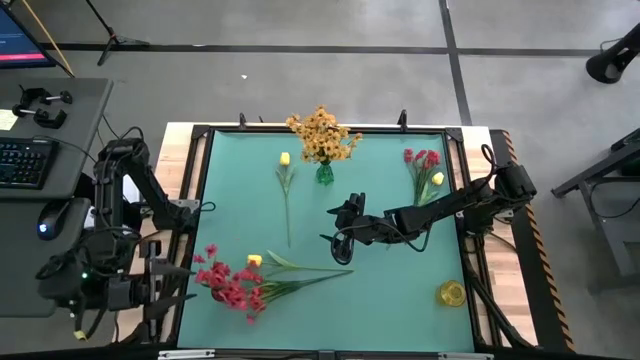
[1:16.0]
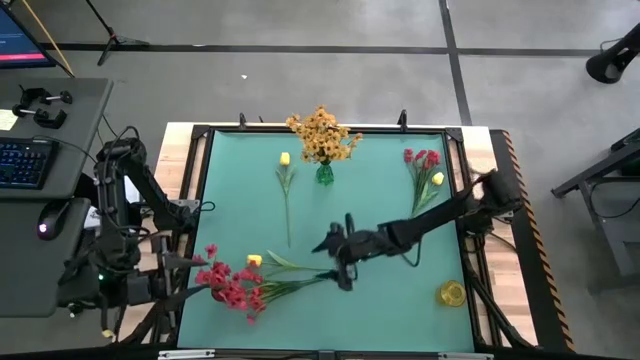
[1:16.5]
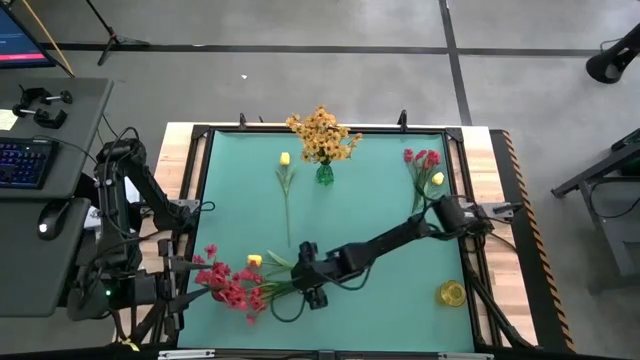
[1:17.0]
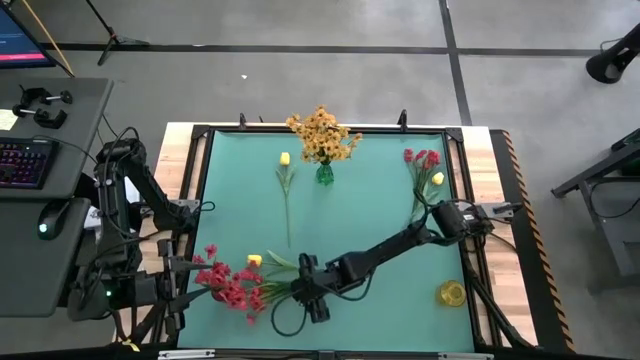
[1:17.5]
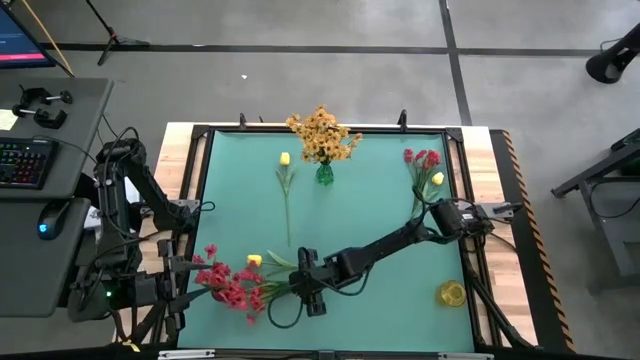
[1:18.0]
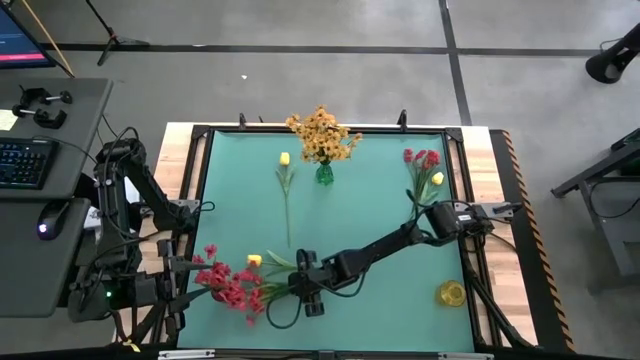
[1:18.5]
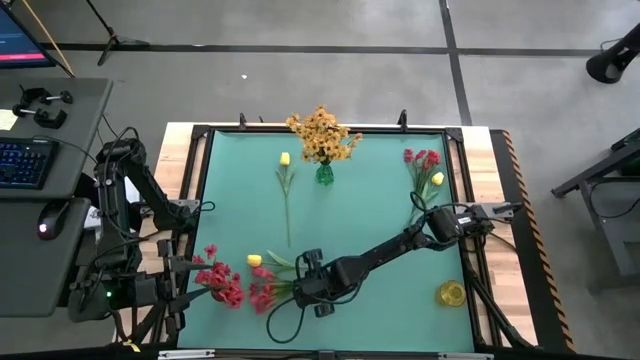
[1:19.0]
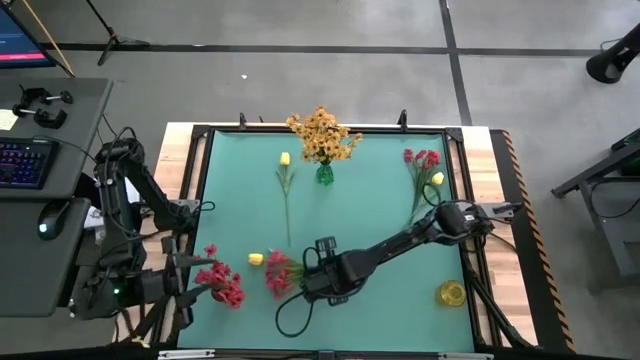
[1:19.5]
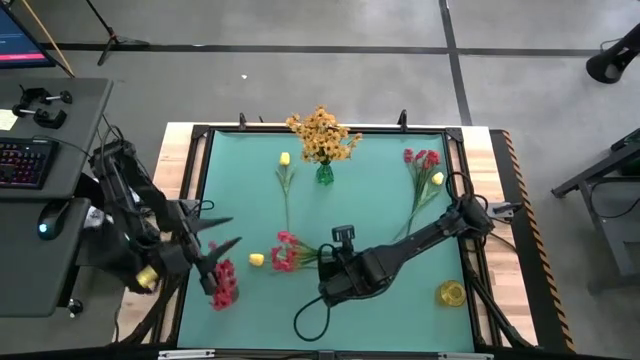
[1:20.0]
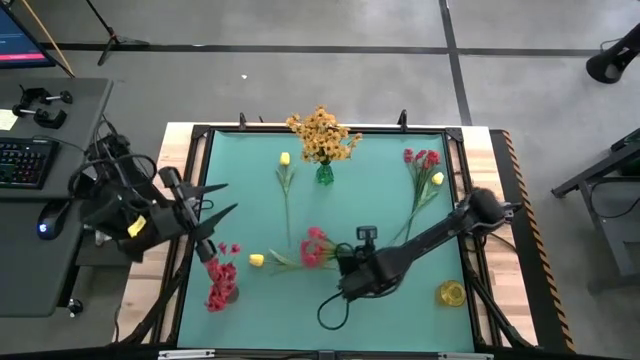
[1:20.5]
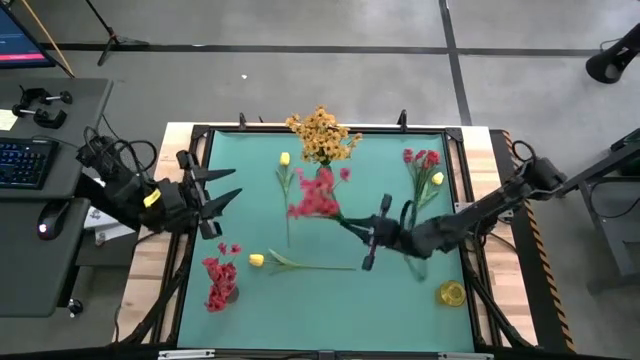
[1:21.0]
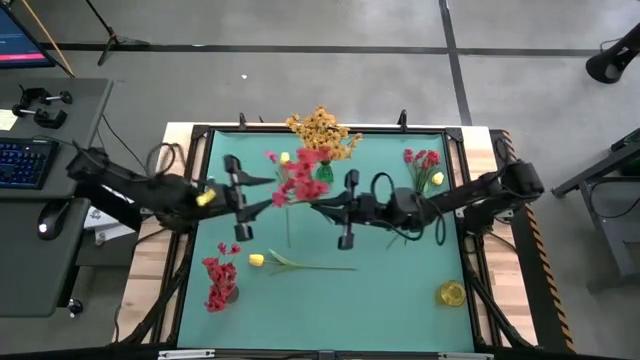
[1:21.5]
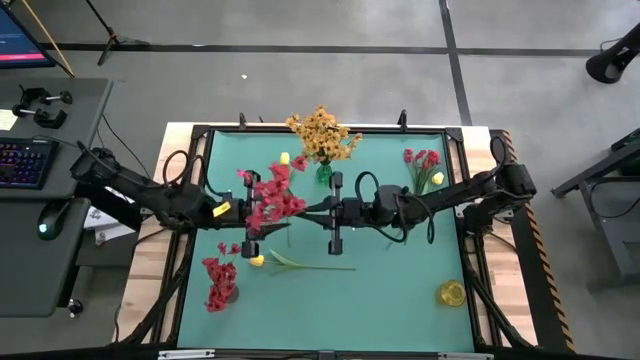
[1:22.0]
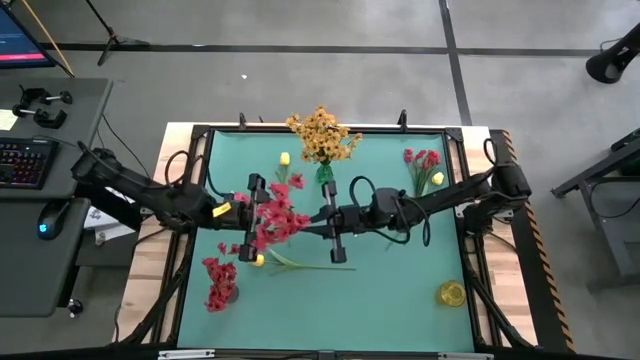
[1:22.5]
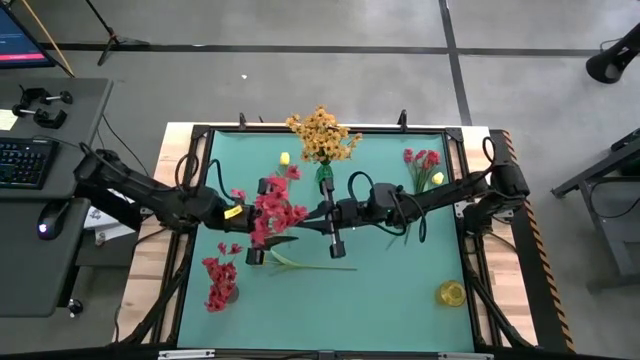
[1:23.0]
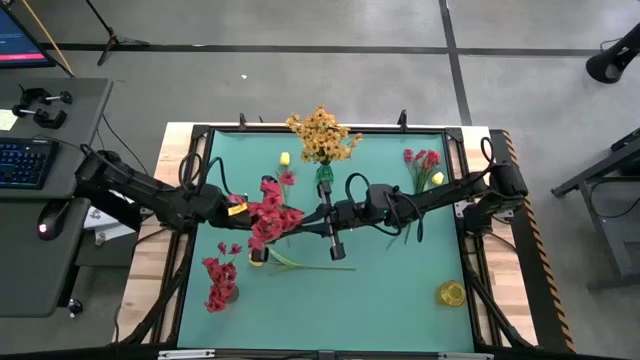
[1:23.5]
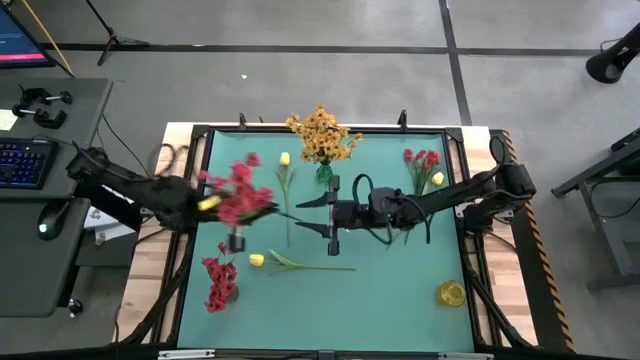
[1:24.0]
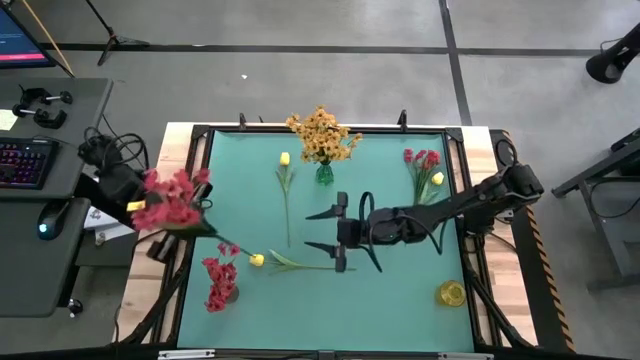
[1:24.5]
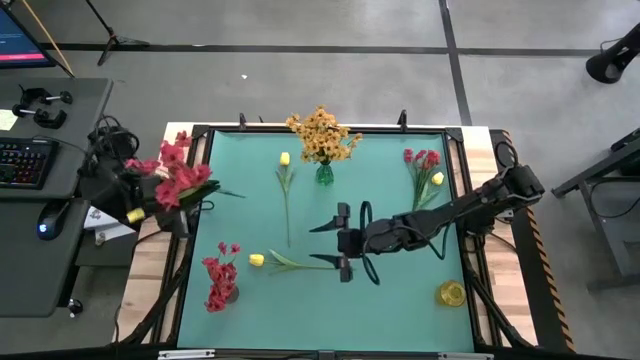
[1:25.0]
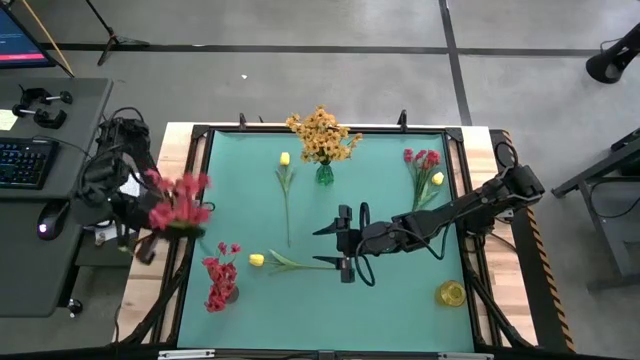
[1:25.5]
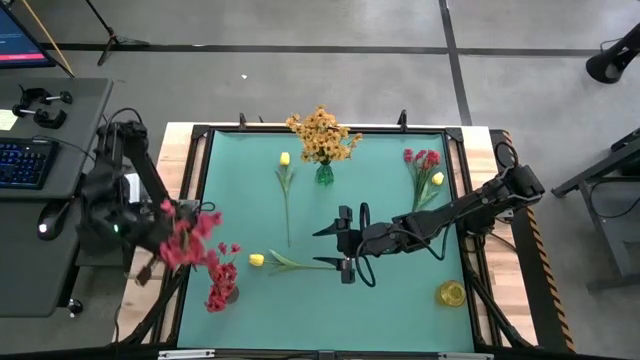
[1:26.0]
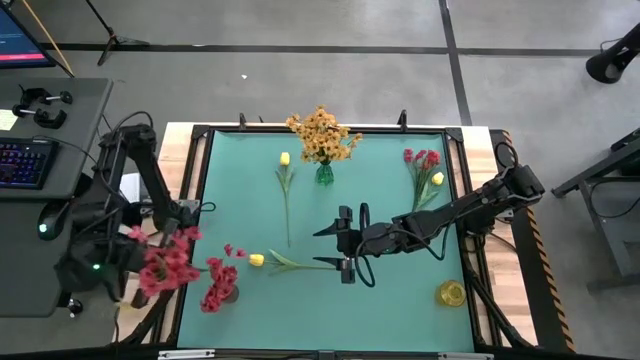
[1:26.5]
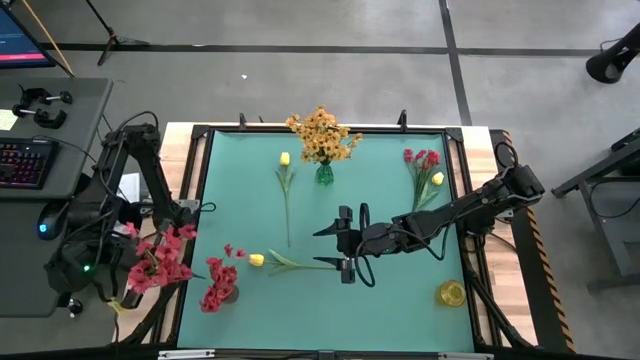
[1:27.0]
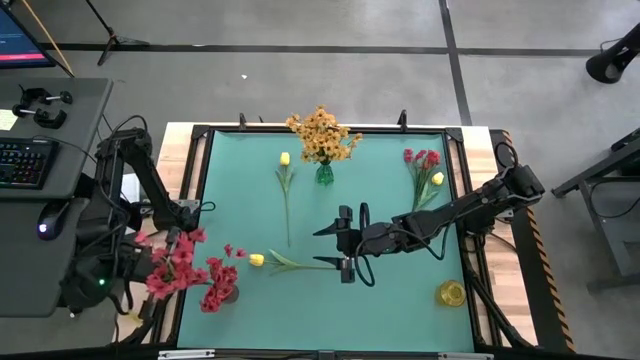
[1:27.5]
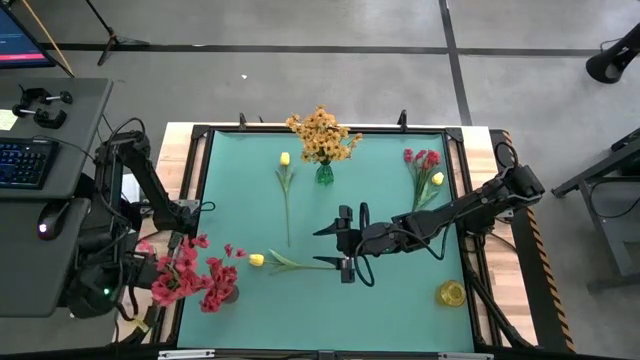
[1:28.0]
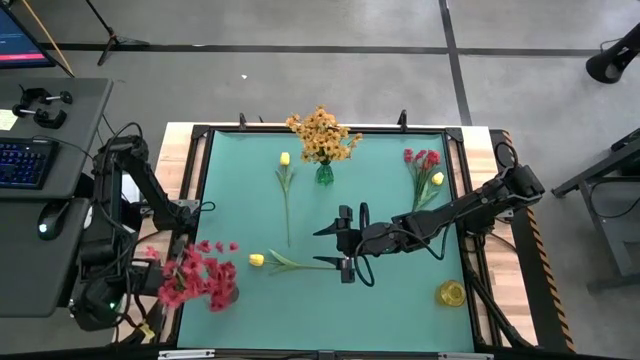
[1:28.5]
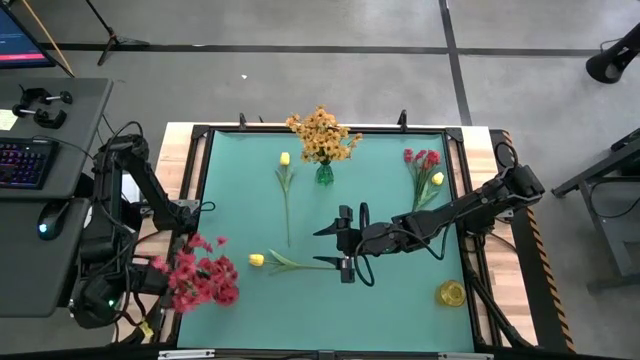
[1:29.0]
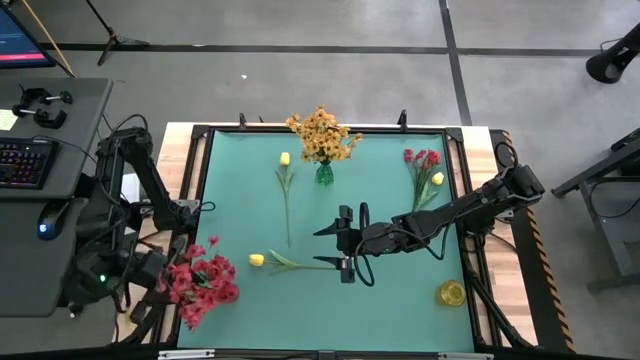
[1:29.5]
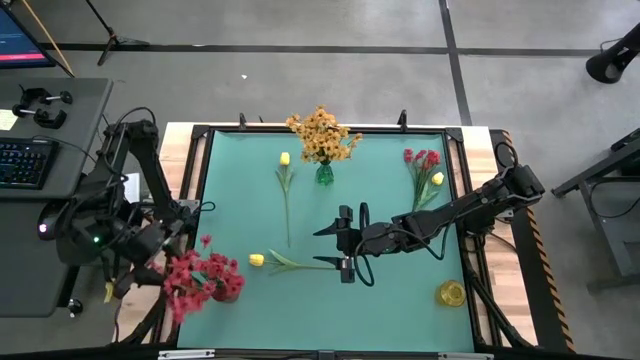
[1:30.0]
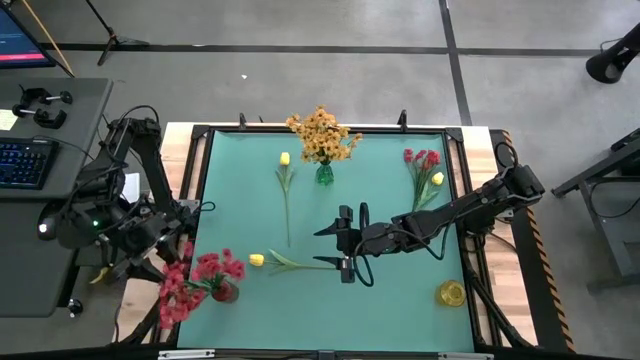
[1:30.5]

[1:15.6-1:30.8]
Task: Sort flowers into vase by color
Put the left red flower into the red vase

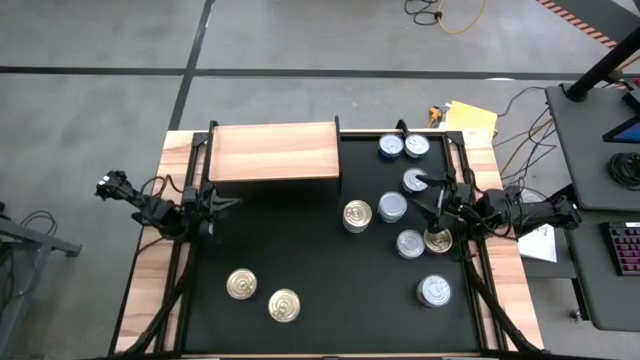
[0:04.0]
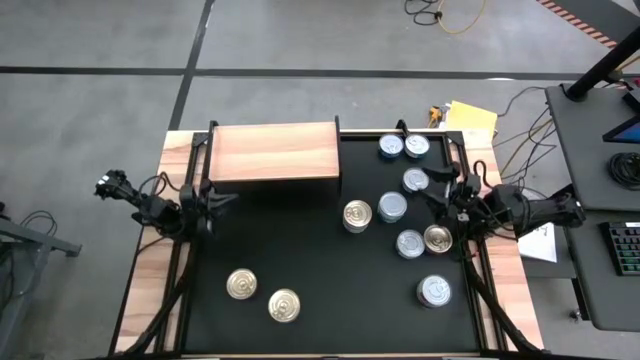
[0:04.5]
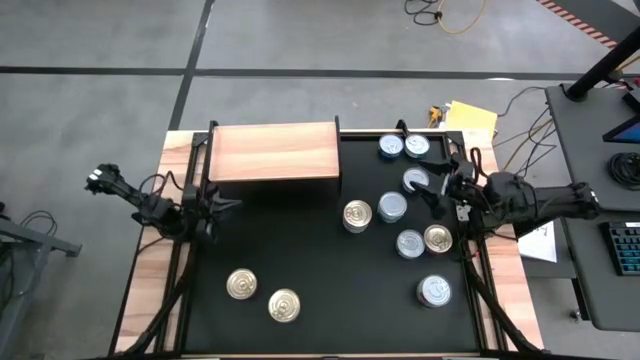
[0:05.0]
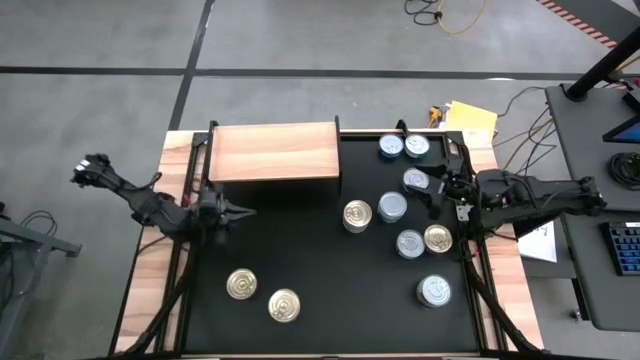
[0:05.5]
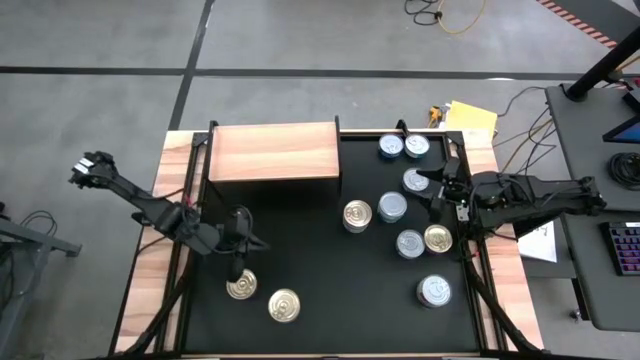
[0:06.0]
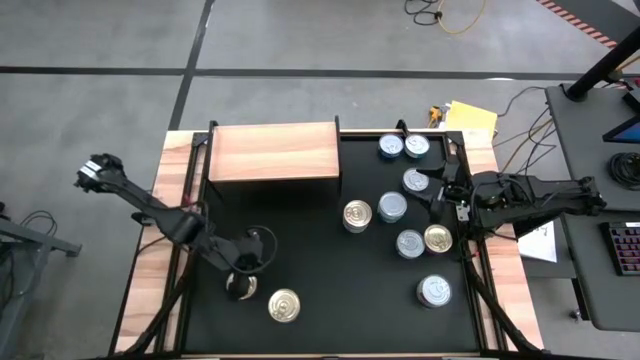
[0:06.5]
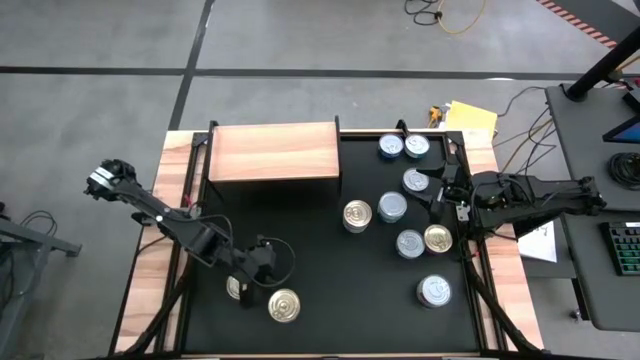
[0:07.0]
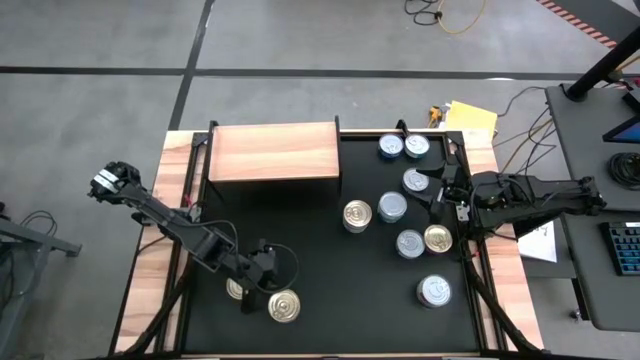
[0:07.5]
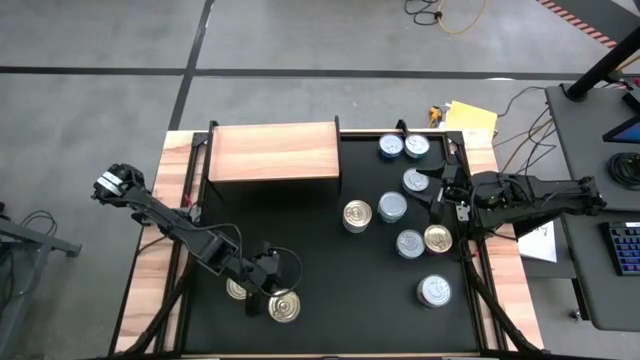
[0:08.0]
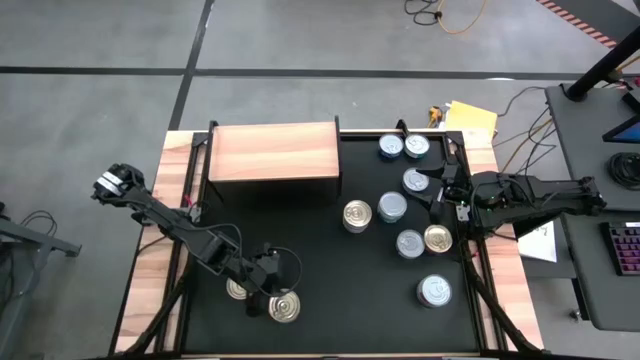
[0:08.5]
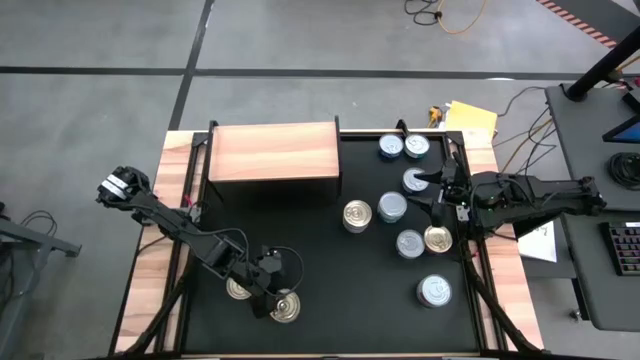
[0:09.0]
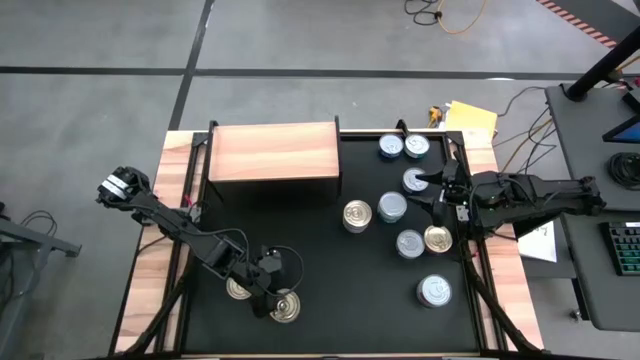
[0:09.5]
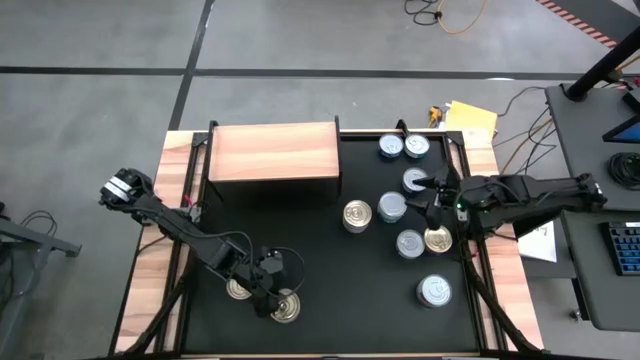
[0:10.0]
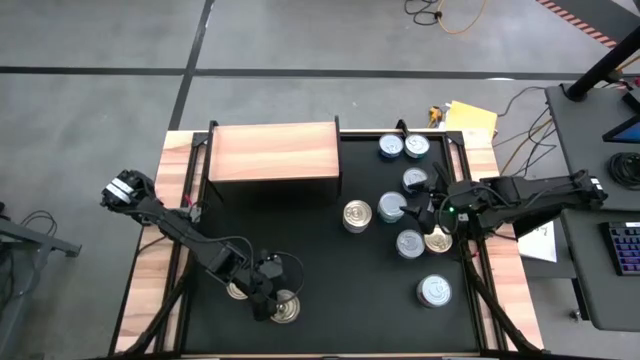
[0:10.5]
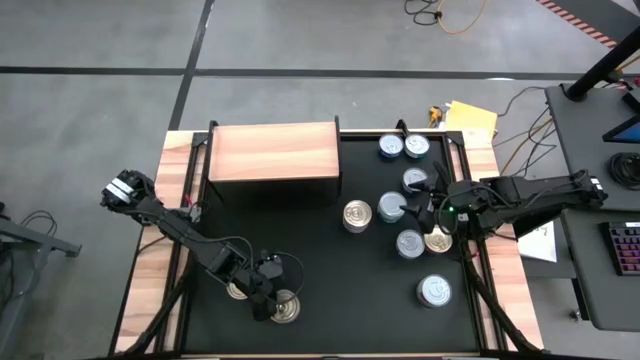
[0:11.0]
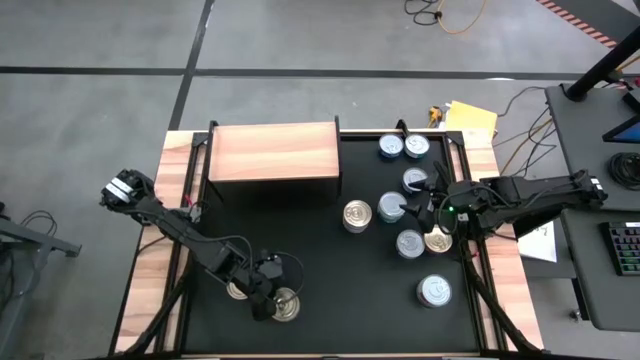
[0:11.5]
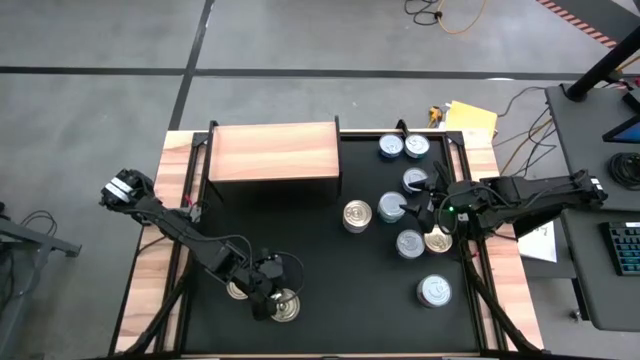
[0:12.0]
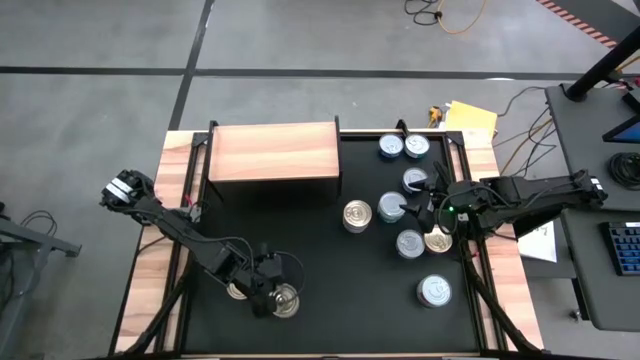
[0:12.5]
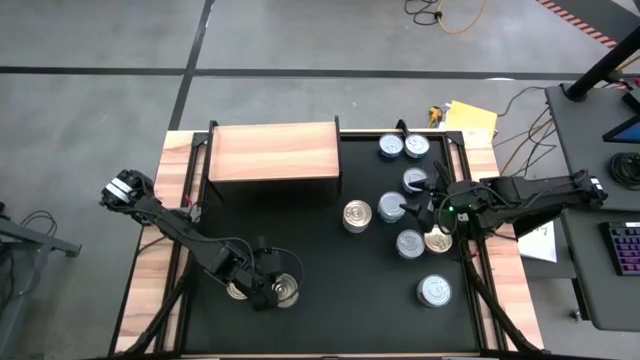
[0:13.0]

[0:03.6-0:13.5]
Task: Stack canned seafood by type on shelf
Put the blue/pink tuna can on the shelf
